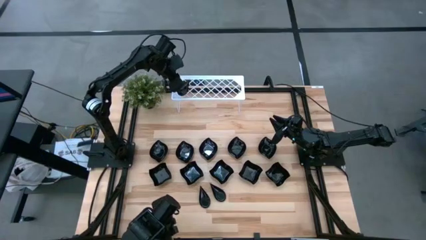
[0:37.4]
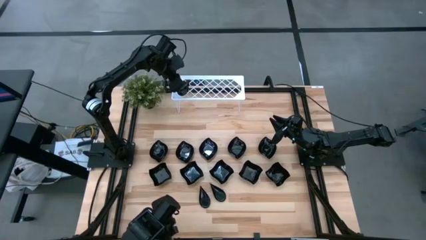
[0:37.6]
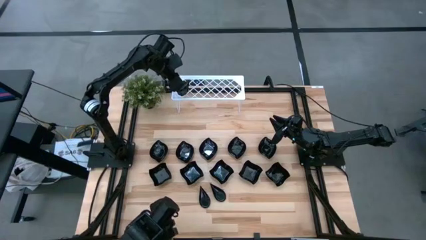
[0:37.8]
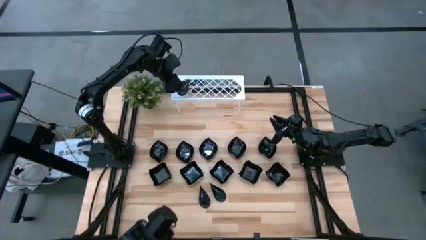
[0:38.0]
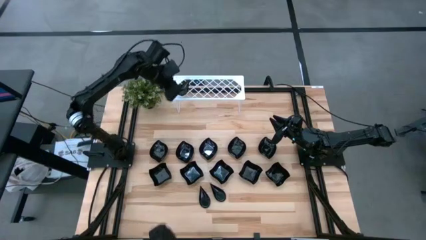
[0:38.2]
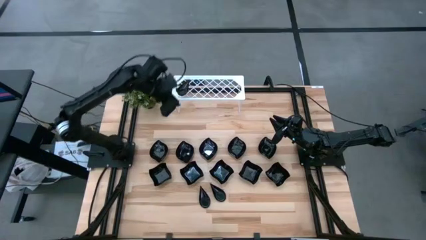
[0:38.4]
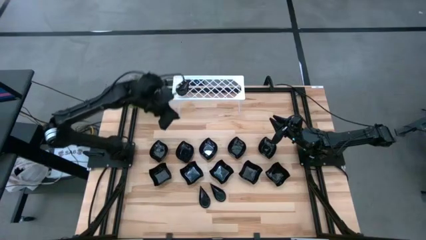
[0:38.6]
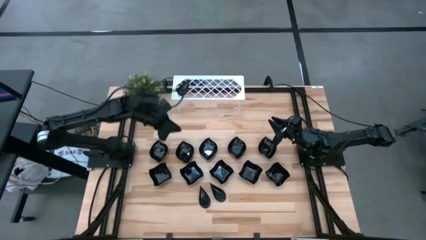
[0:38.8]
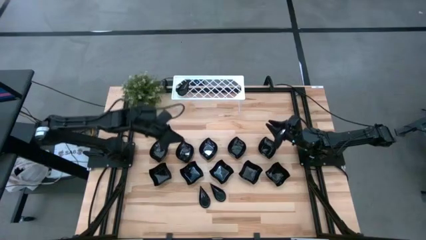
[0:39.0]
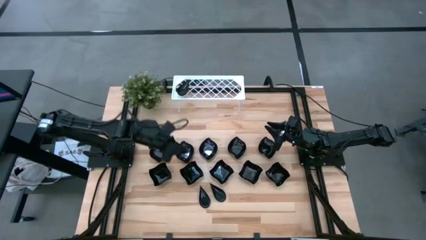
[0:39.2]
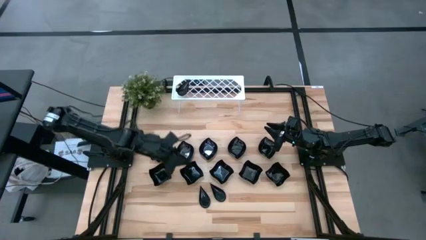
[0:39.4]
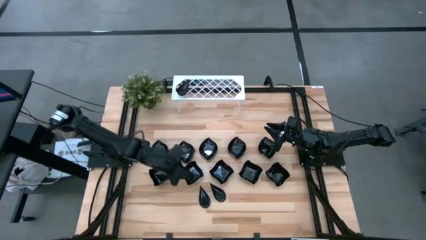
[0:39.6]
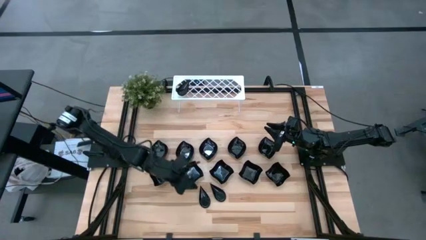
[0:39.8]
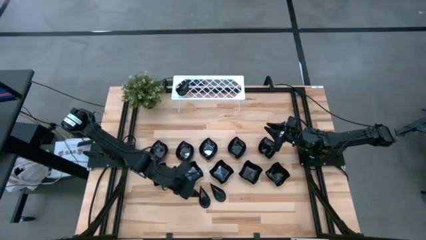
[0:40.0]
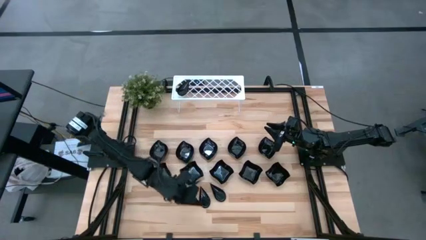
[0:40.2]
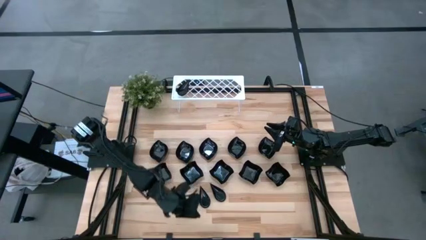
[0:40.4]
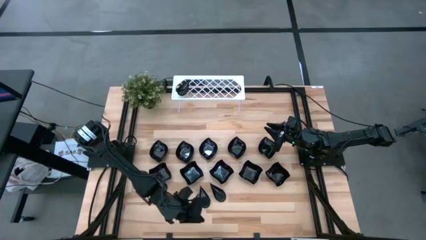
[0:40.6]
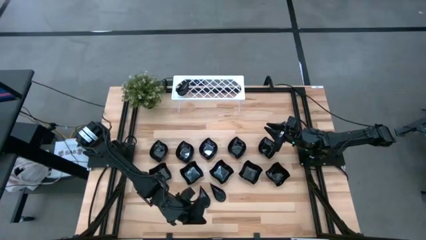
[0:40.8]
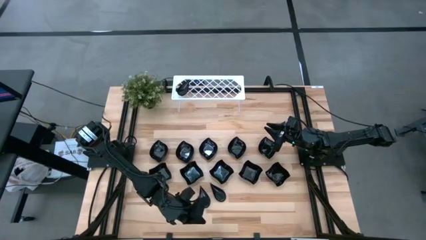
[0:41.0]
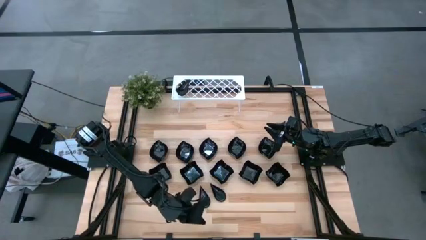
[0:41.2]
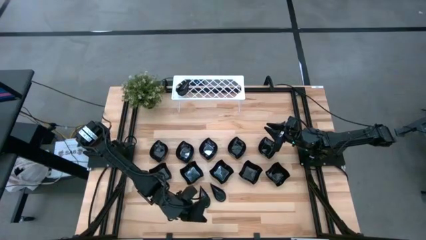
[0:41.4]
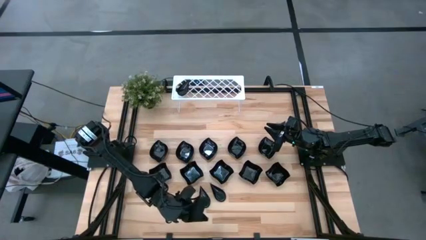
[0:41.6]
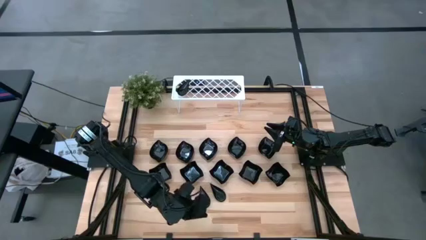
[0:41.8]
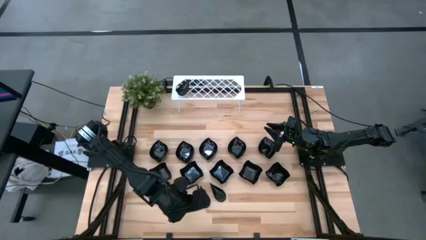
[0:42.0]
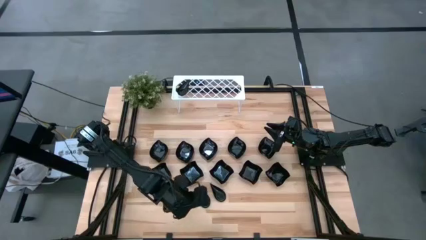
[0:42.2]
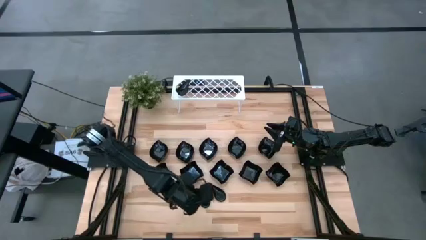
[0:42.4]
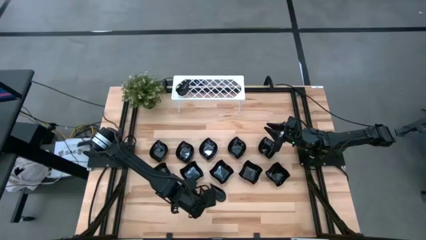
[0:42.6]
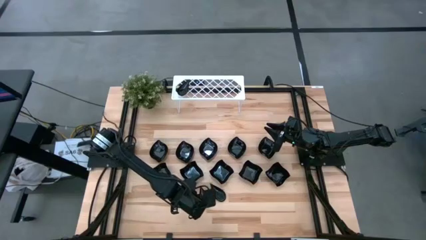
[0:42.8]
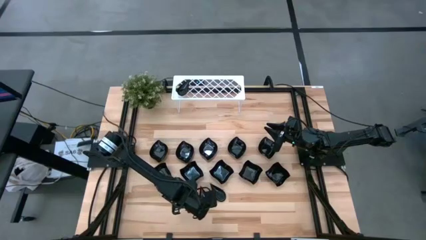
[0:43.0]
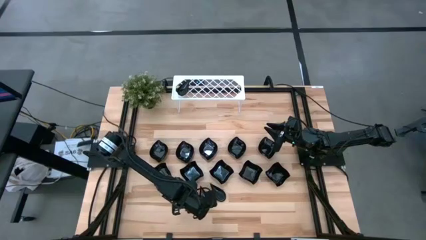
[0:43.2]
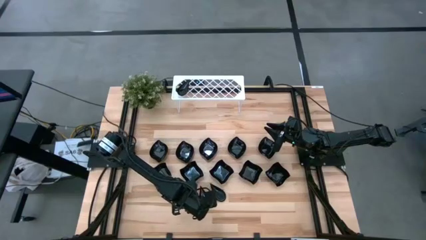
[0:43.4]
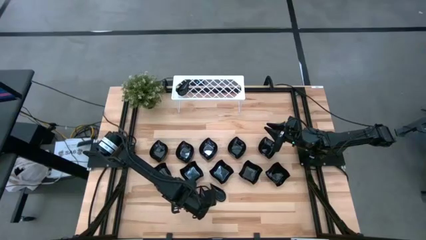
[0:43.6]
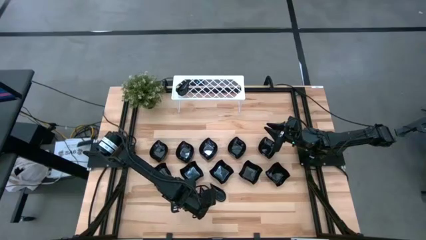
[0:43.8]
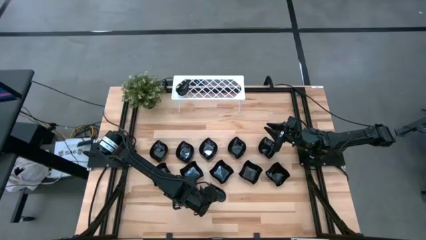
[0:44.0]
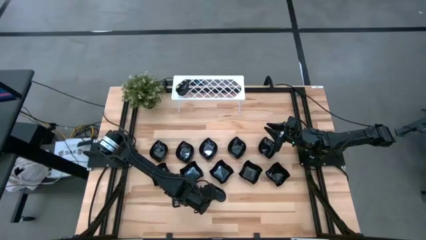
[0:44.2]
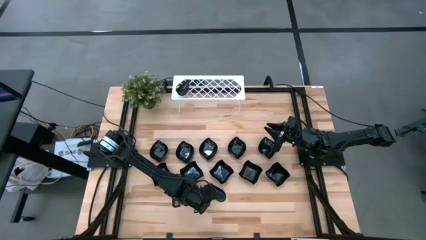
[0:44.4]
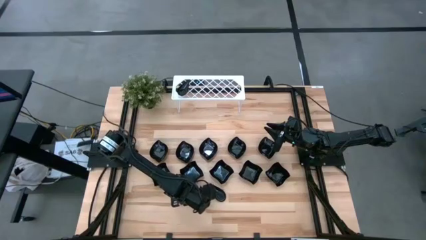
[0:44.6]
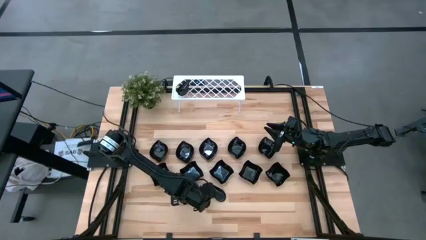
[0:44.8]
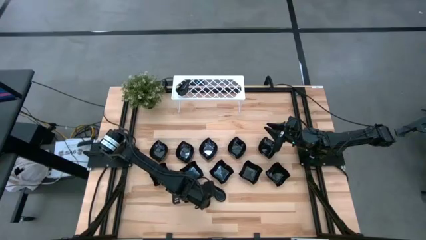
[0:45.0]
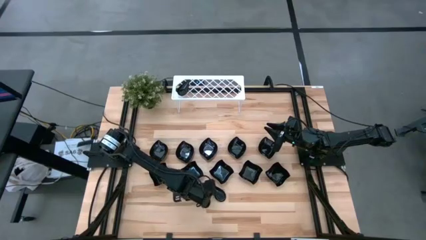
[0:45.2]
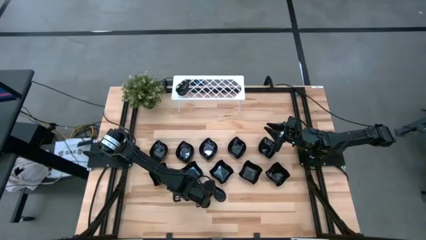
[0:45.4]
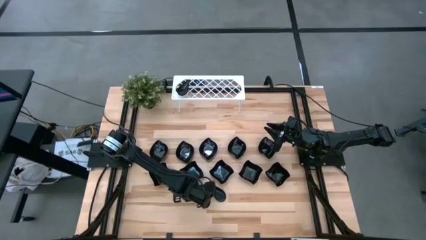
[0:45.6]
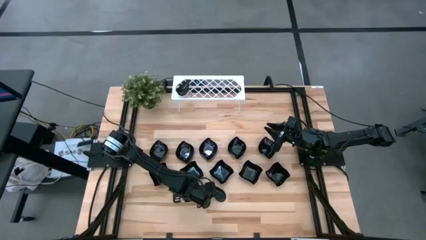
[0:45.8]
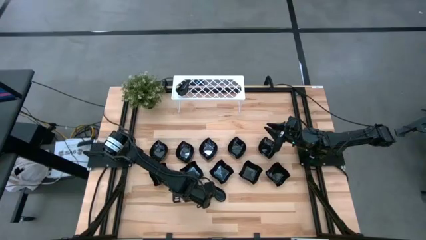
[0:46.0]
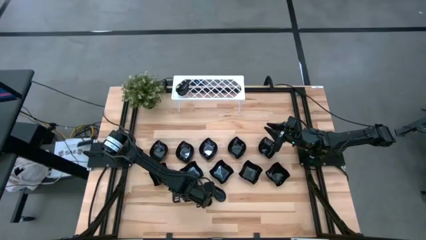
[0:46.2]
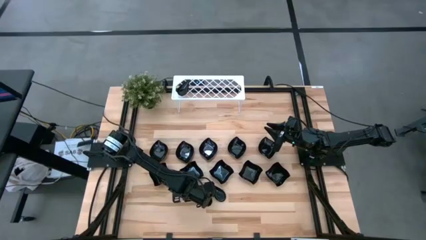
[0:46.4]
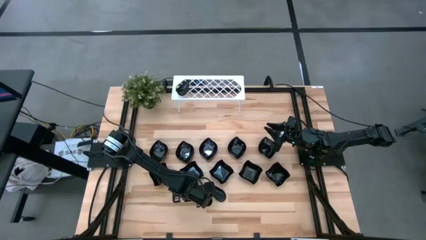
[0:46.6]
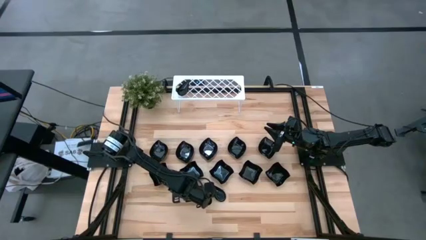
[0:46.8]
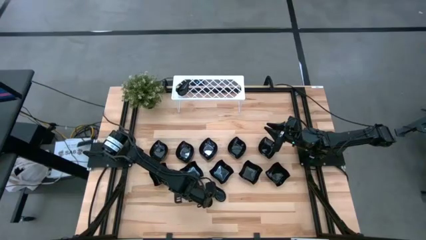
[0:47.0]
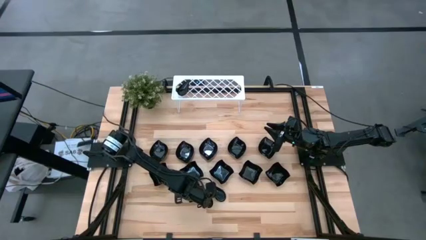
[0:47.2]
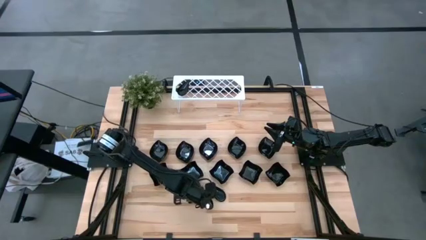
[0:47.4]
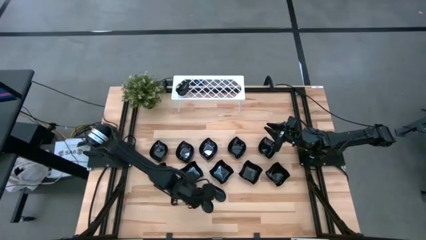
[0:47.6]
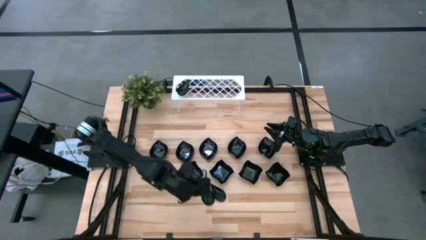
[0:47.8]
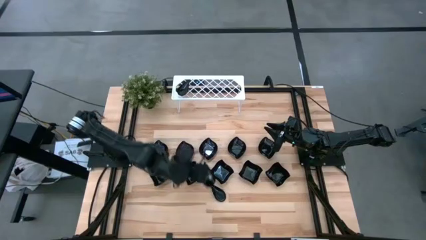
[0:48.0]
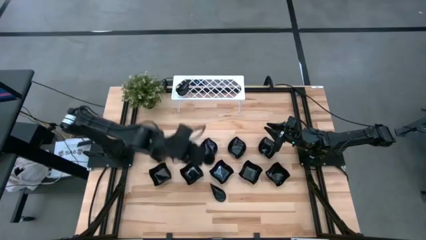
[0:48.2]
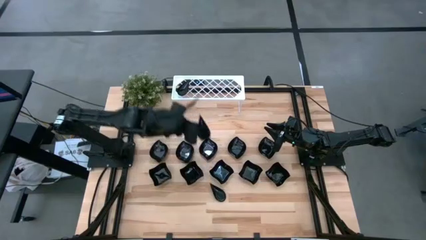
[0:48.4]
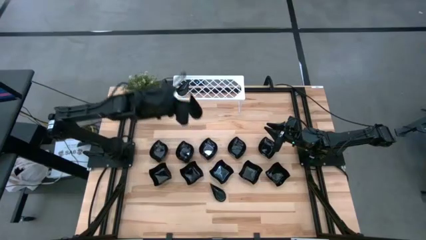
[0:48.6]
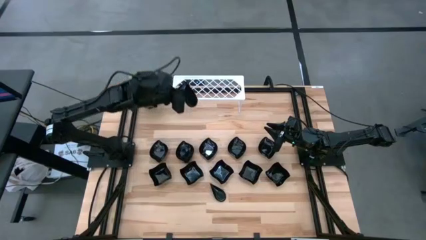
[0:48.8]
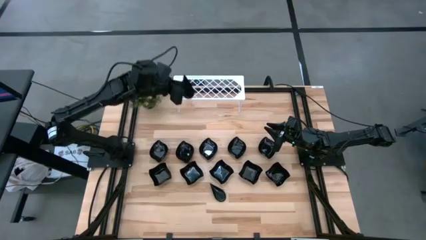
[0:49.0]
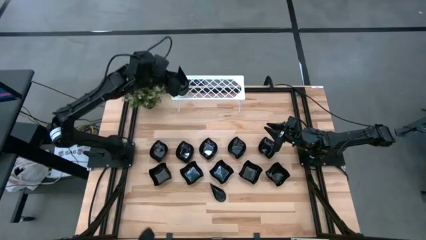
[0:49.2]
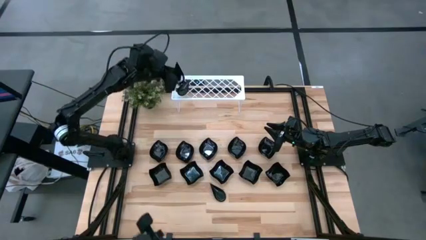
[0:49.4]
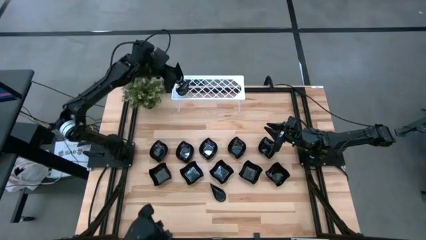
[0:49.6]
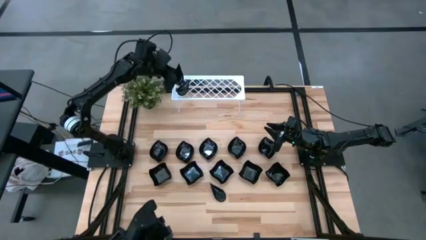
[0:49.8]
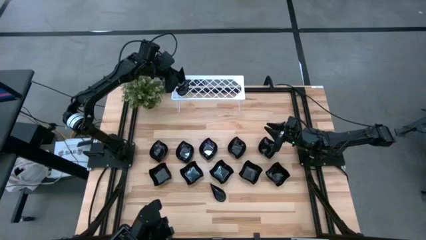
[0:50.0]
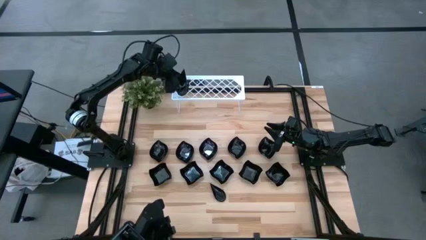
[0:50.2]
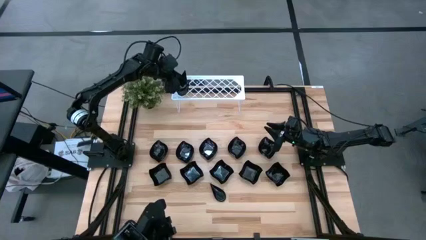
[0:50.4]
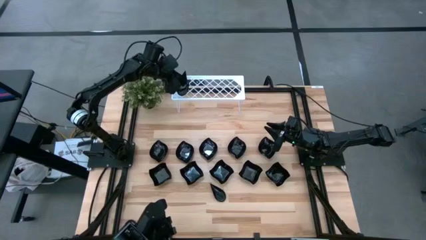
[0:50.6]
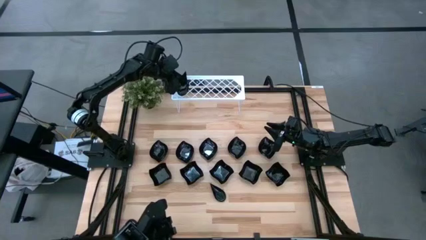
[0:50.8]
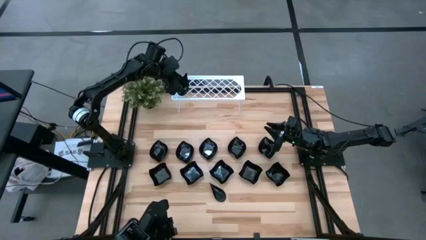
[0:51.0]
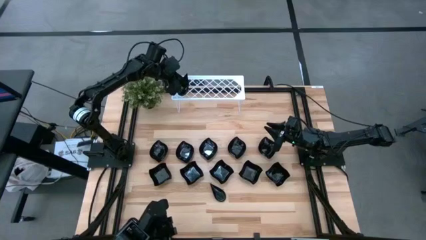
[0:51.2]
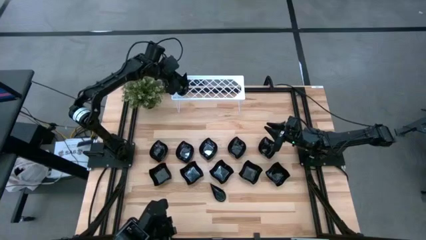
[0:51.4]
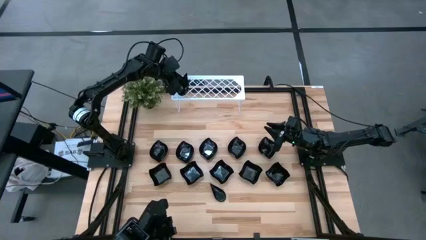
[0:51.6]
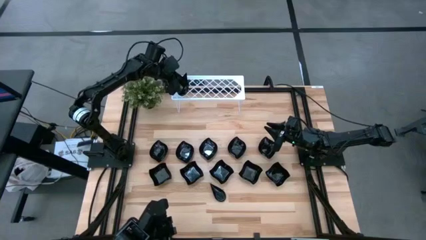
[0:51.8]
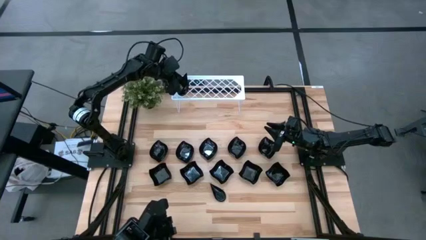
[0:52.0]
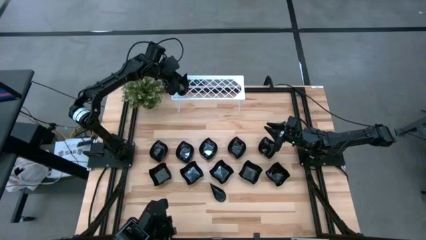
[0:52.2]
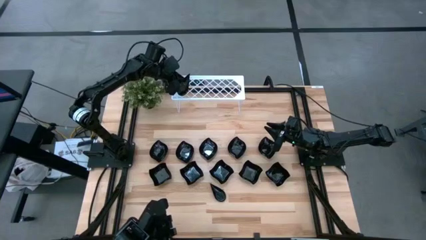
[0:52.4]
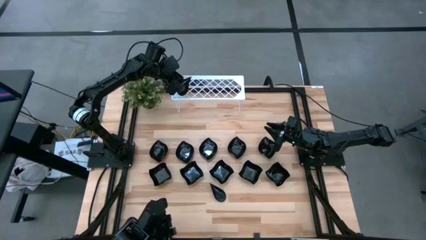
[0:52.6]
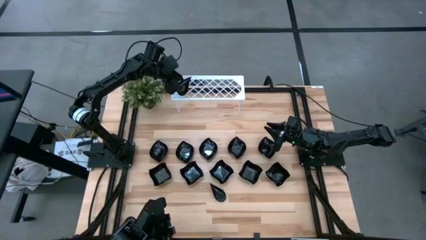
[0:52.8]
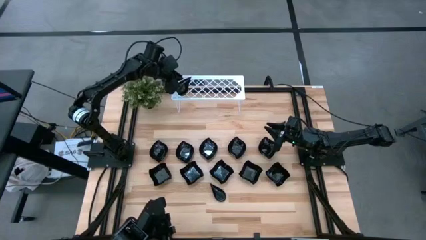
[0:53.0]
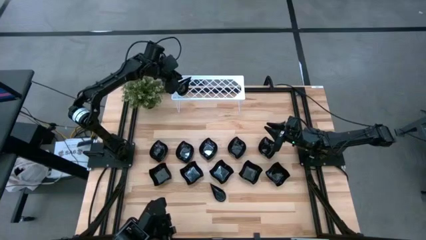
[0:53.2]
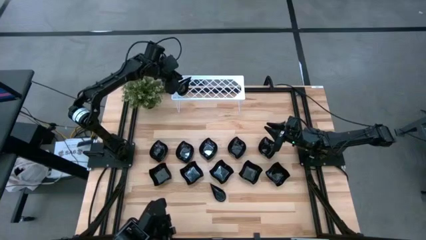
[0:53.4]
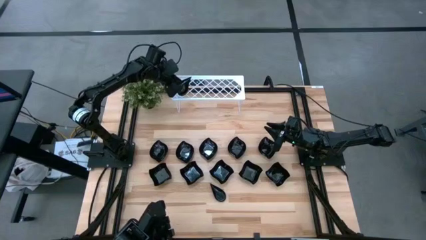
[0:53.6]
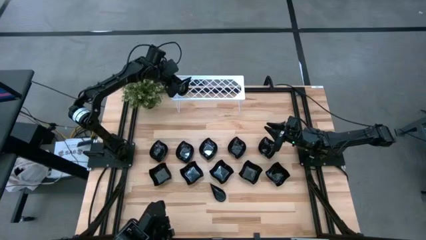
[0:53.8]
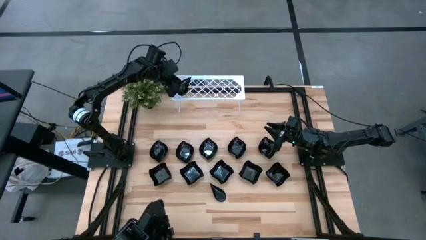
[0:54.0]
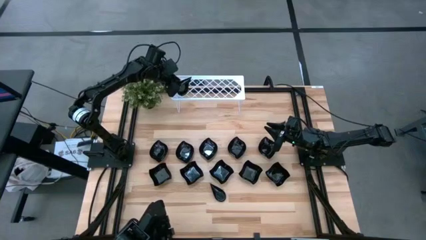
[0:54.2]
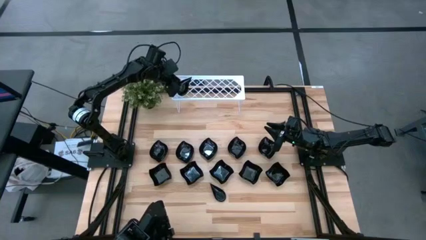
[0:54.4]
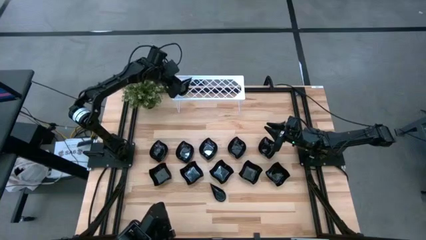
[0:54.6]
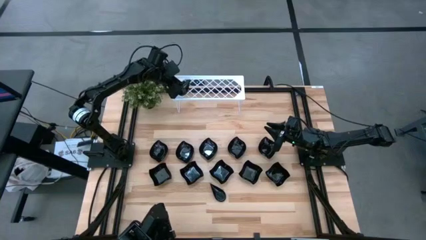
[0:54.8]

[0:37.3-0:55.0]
Task: Pick & Place Mini shaped plates
Stack the black drop shaped plate on top of the black drop shaped plate on the shelf
